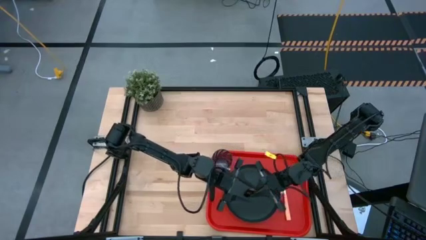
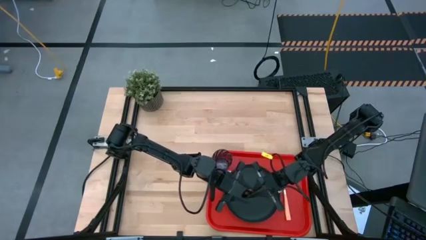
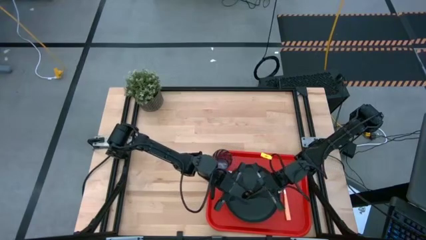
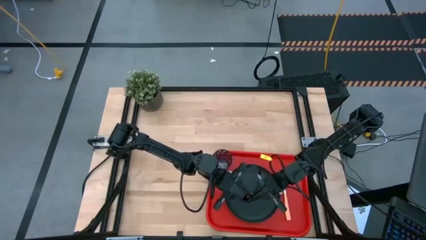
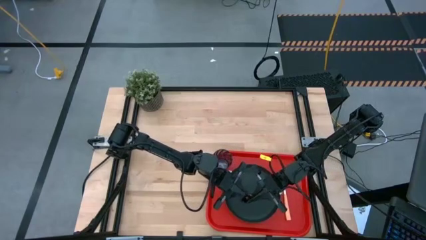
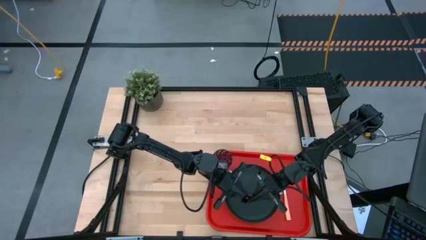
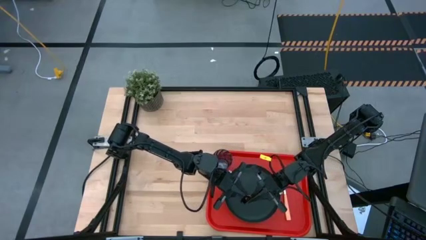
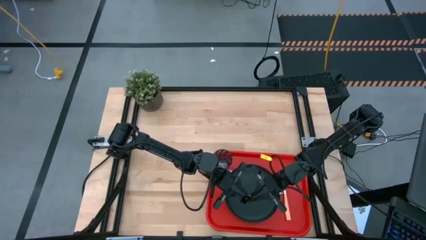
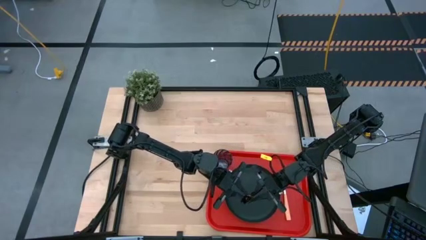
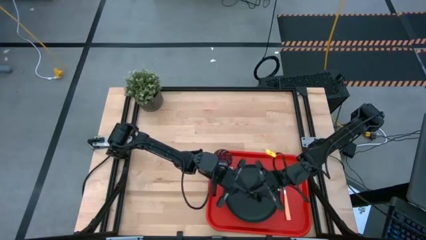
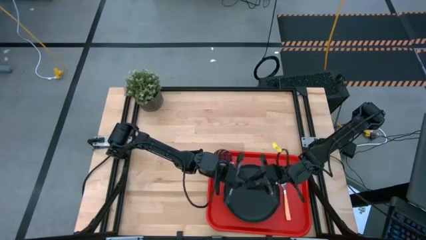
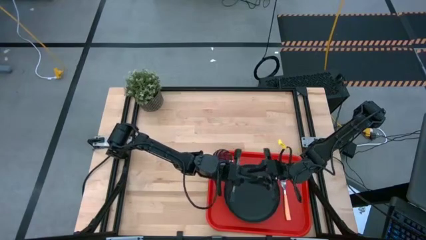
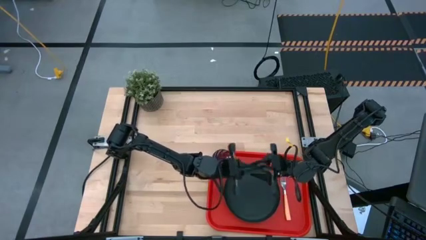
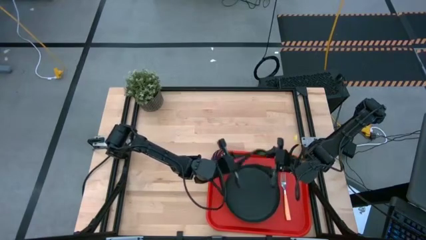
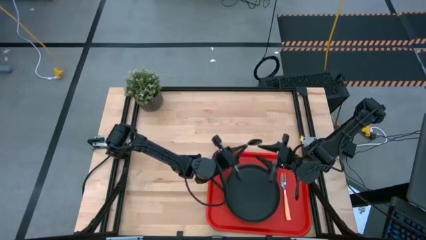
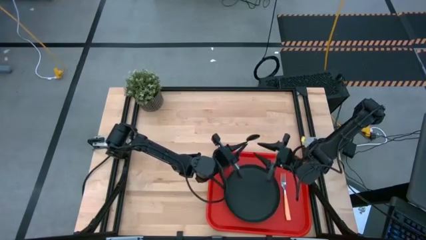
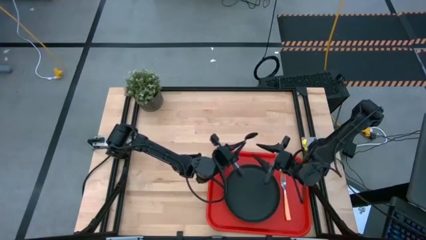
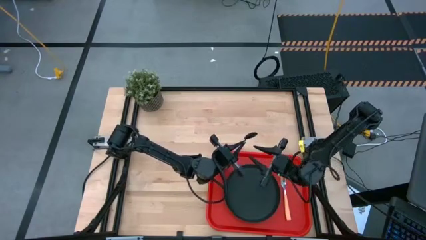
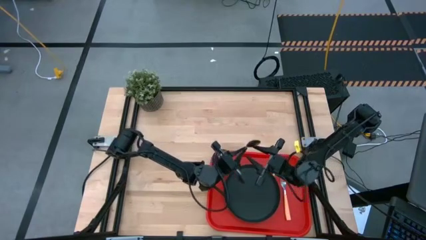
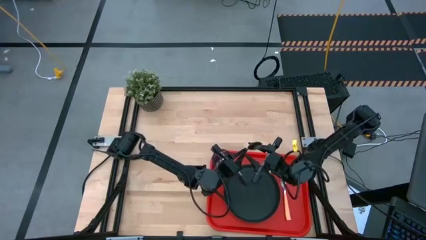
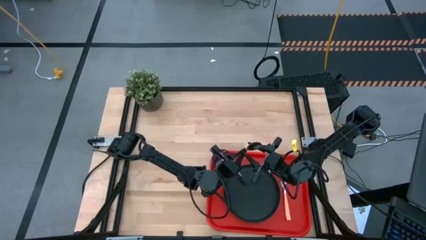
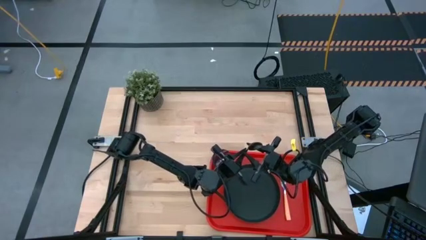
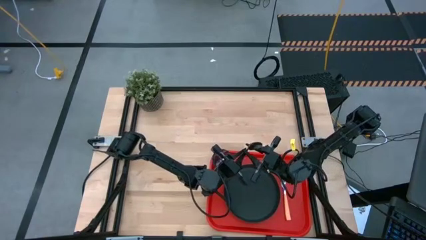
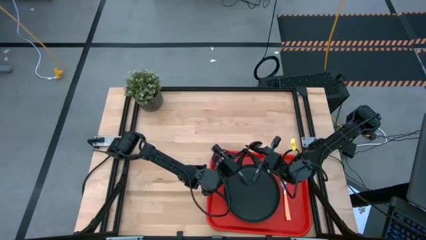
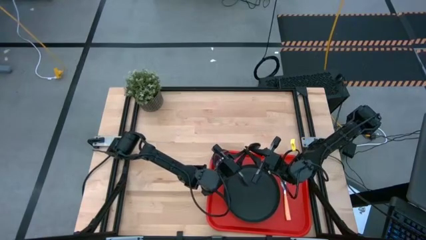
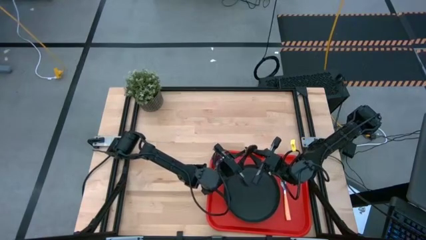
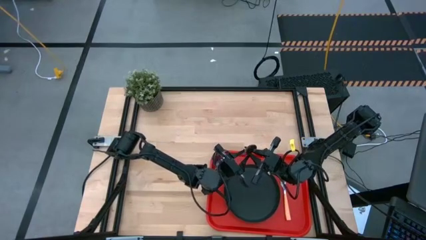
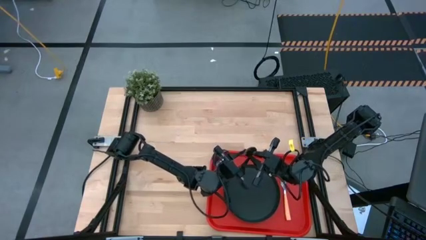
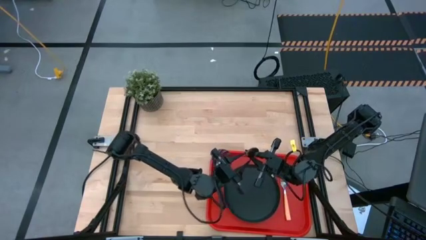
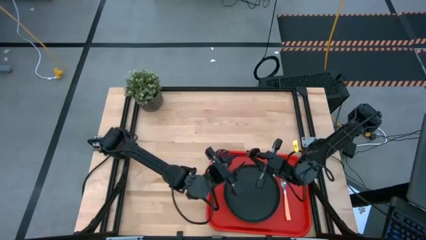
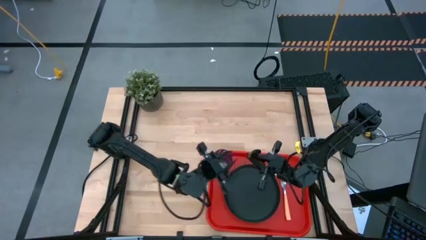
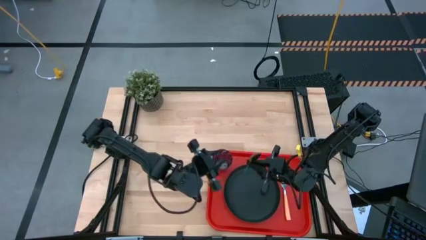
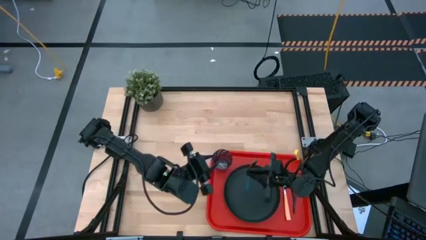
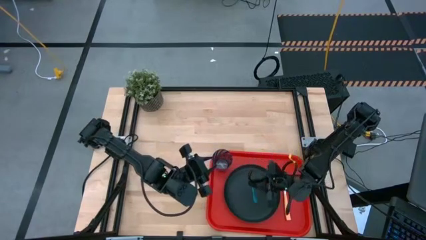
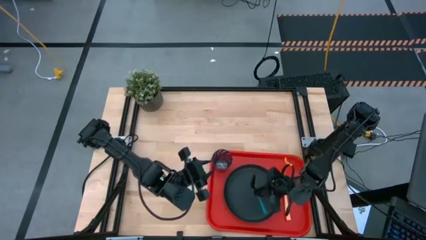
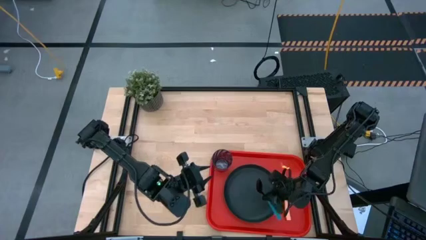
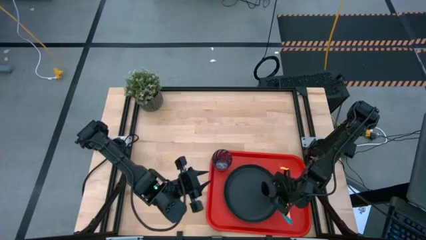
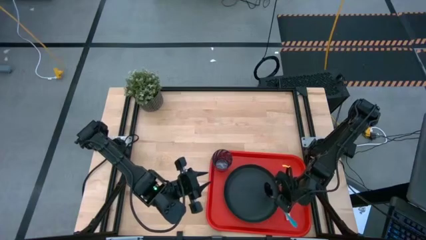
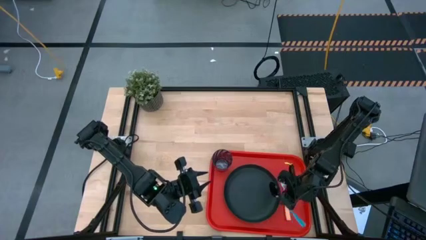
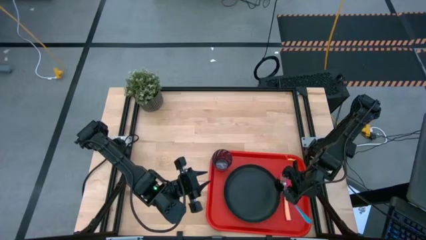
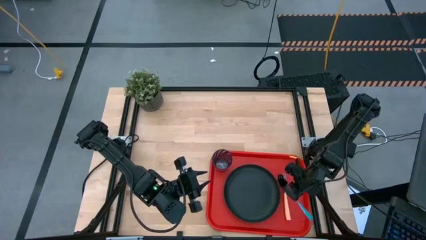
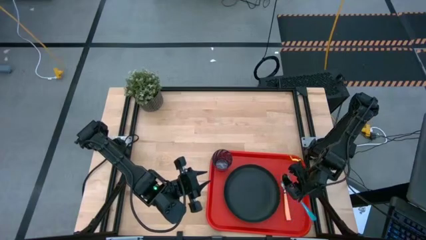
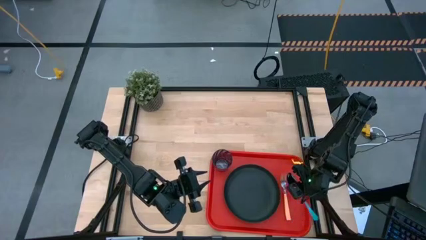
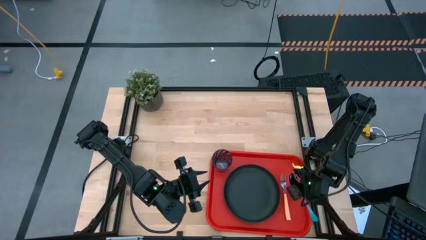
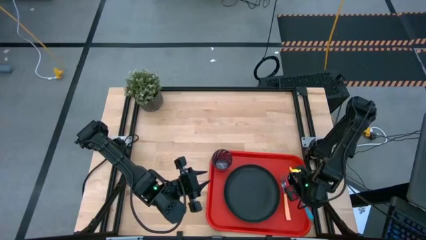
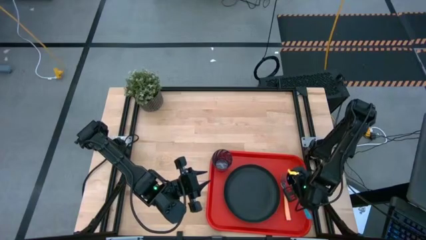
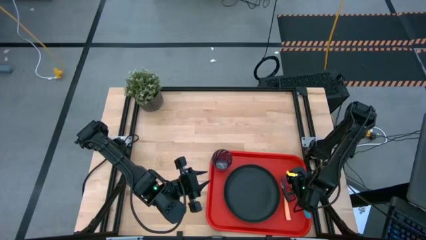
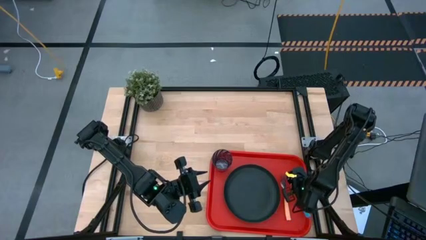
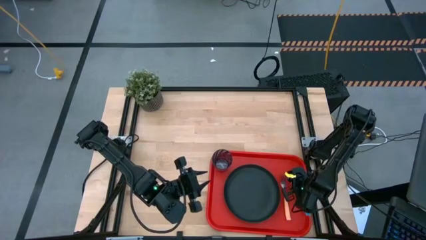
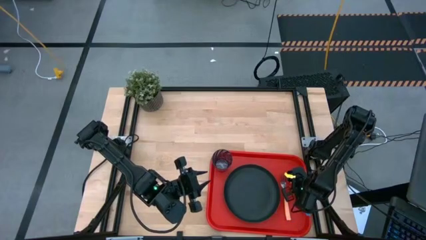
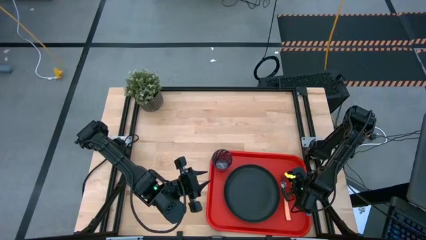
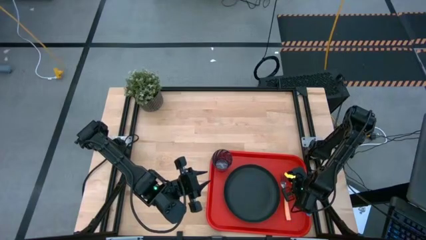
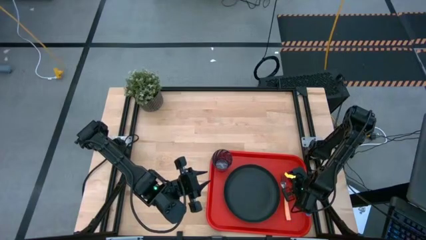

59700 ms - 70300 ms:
Task: Pick and place plate/cup/fork/spoon on tray
Put the blue spoon on the tray to the right of the orange fork

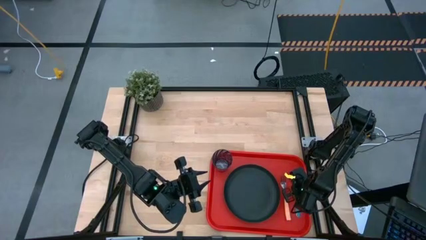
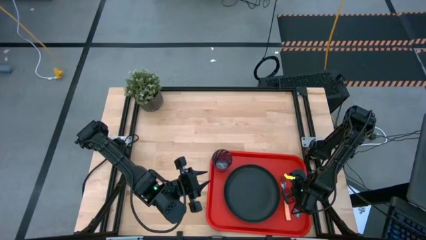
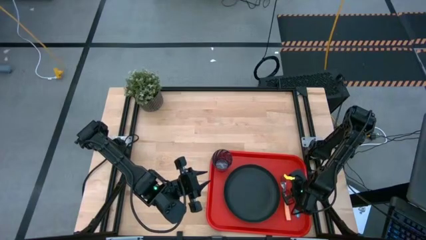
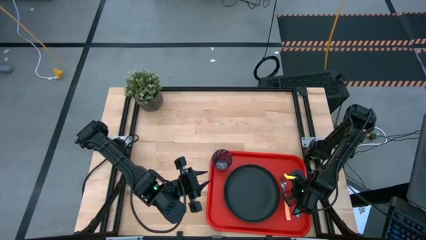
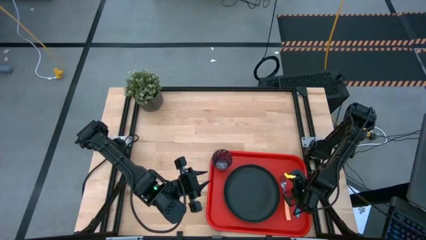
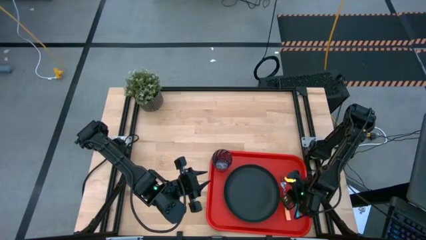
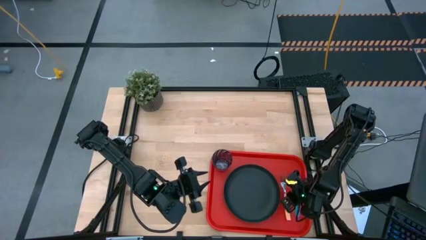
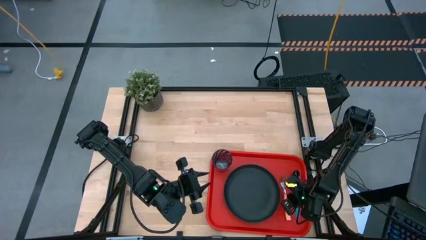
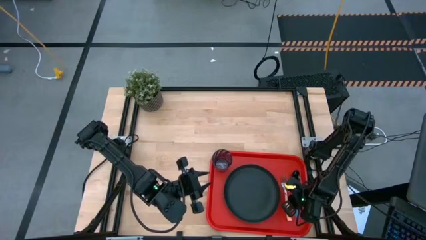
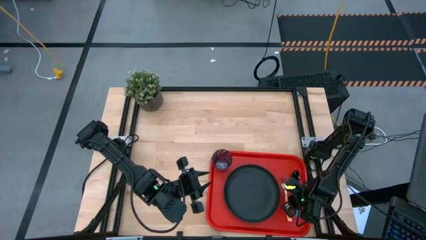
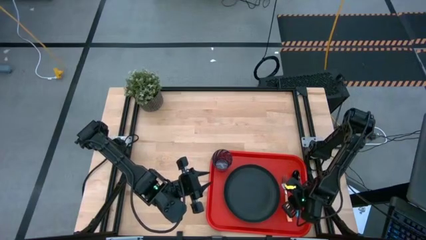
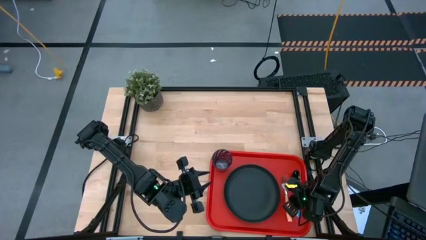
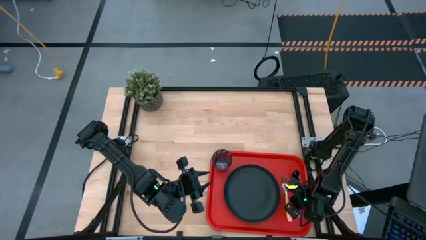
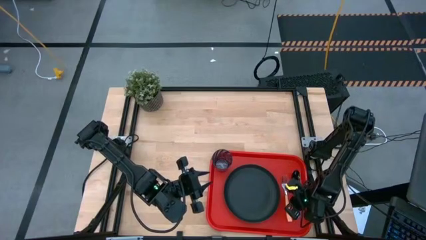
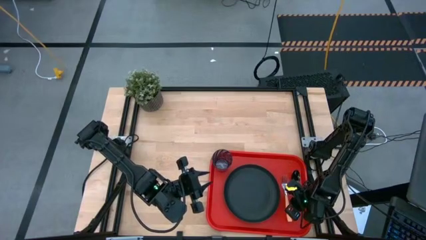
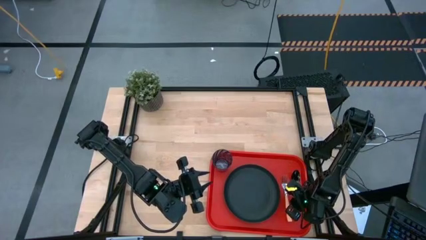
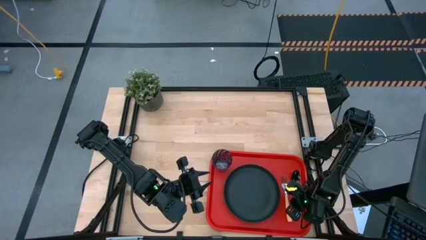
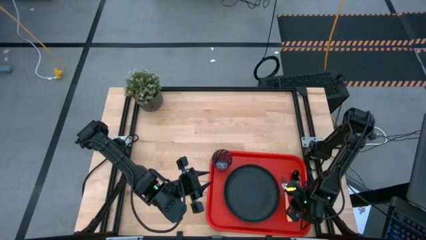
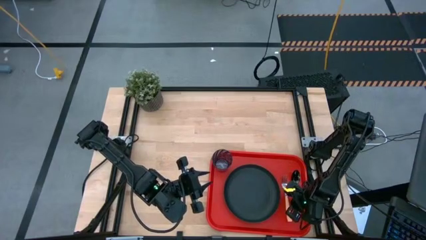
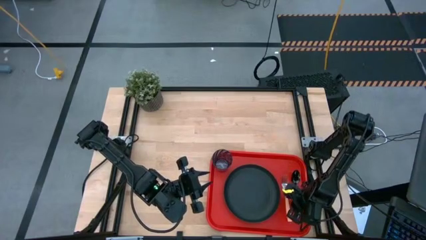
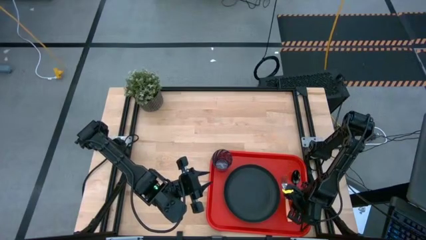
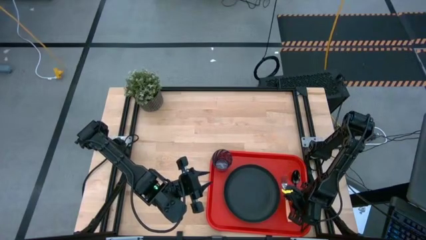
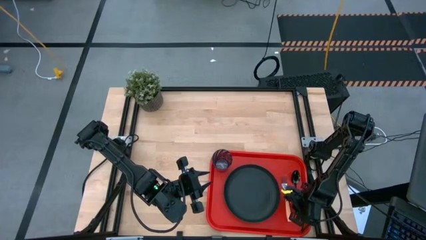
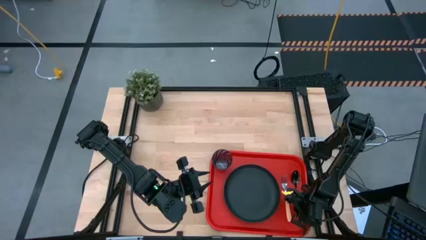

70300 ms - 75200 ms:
Adjust the spoon and fork

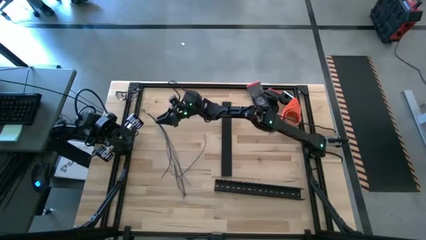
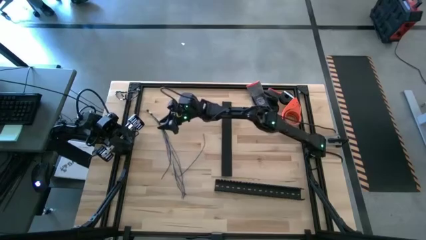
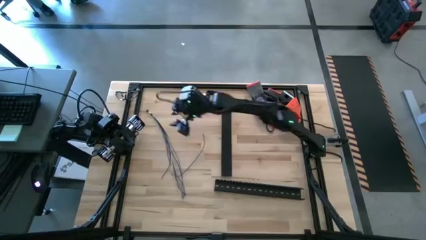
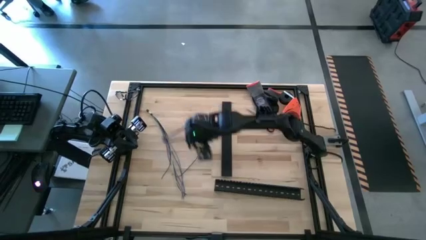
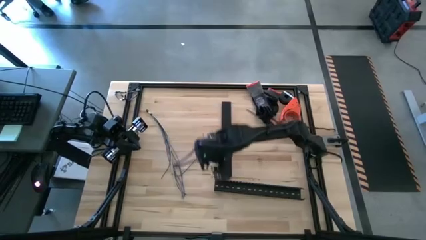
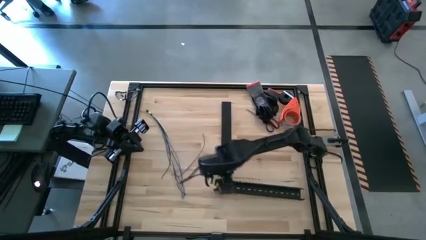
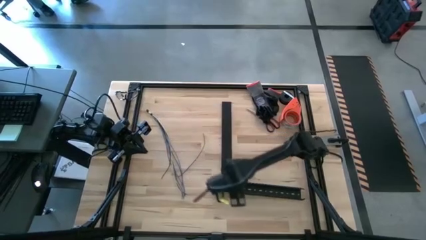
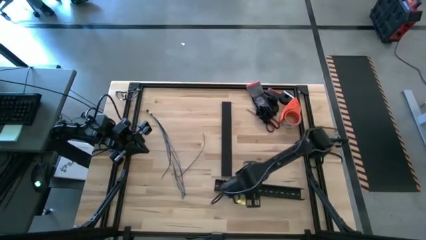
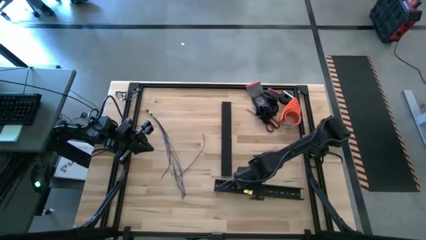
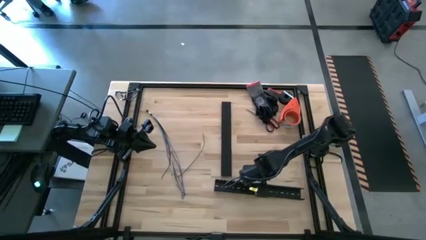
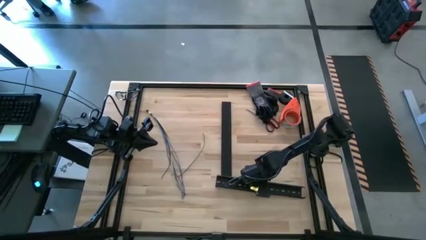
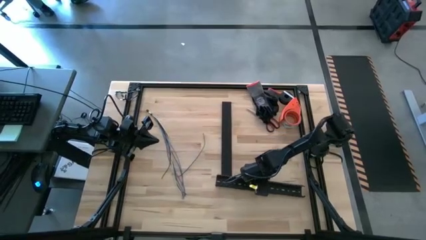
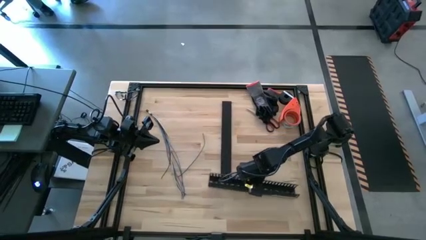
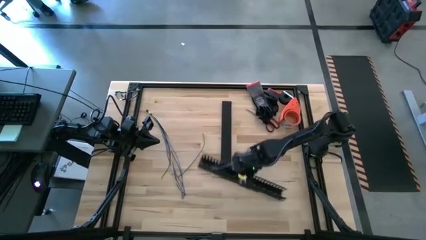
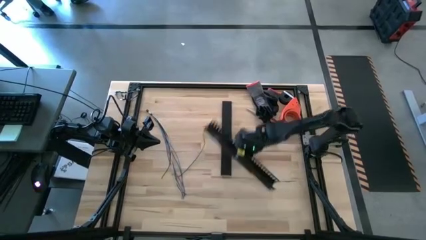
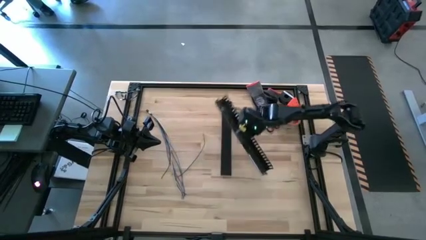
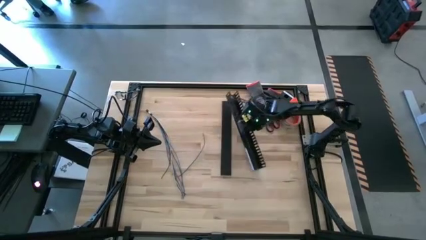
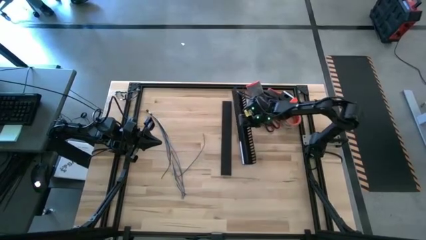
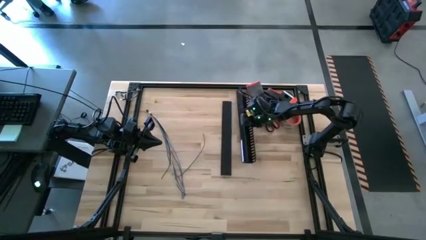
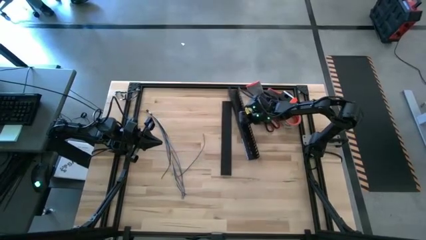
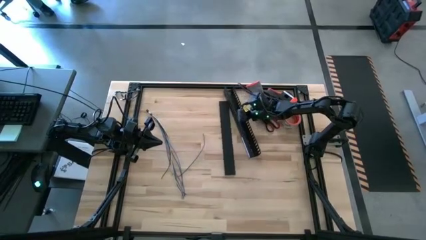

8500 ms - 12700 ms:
Task: Ziptie cables
Move the cable duct to the top center of the table
